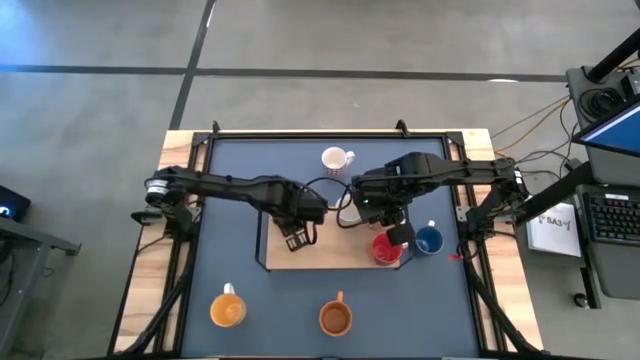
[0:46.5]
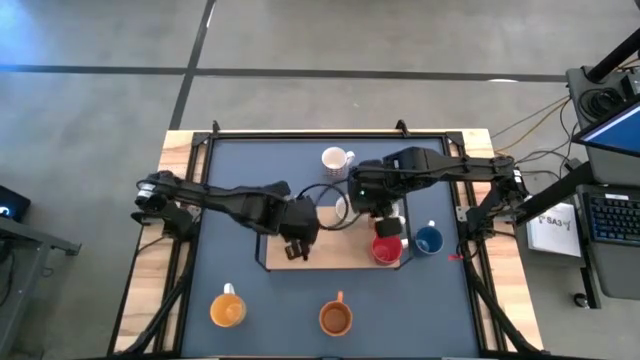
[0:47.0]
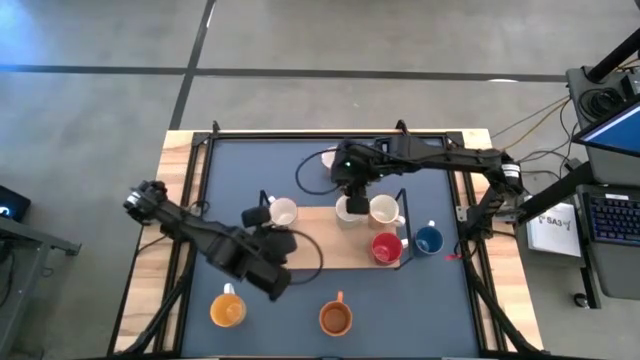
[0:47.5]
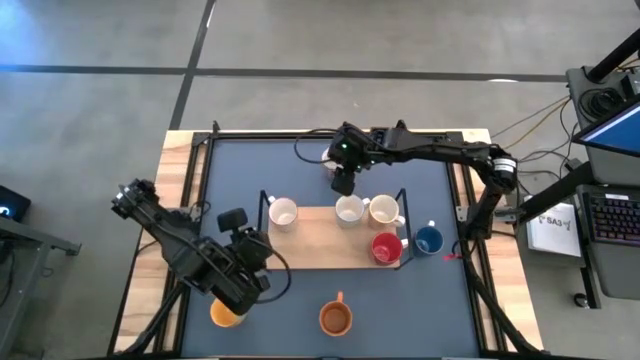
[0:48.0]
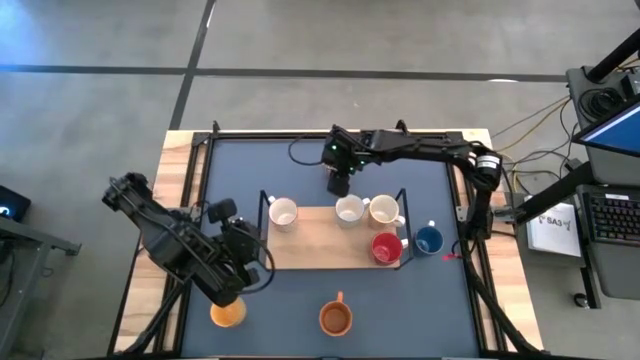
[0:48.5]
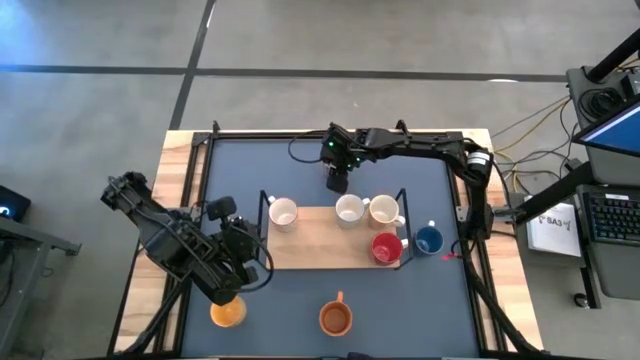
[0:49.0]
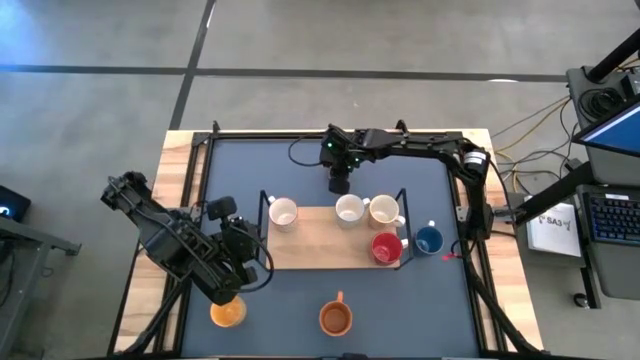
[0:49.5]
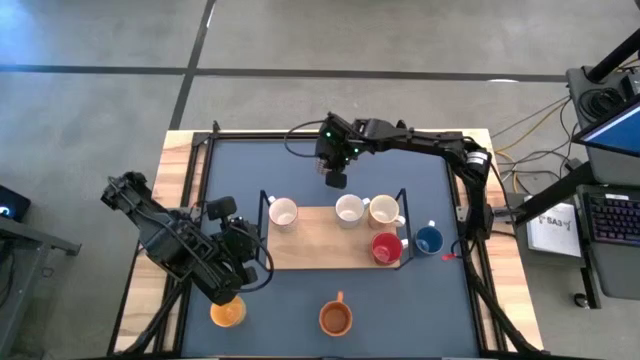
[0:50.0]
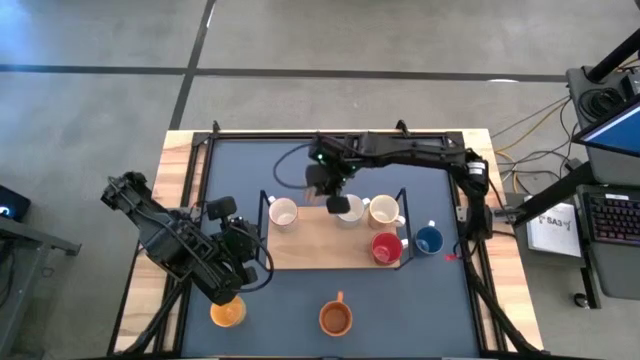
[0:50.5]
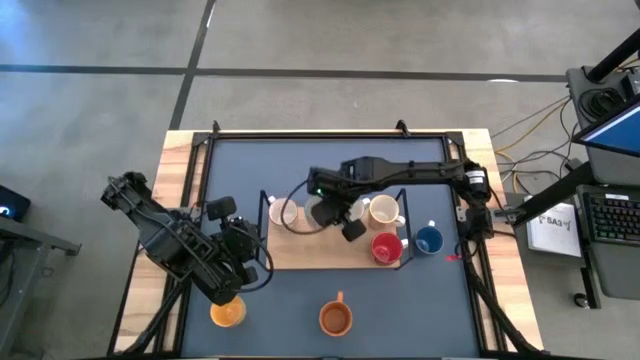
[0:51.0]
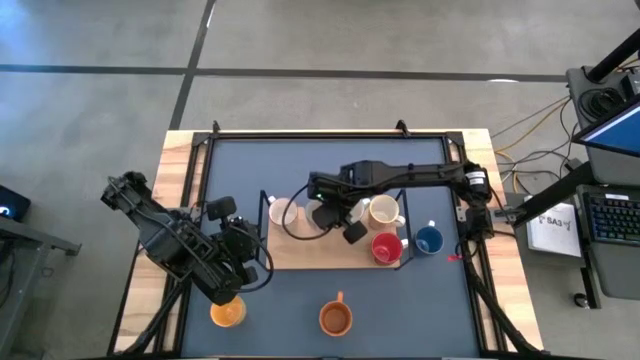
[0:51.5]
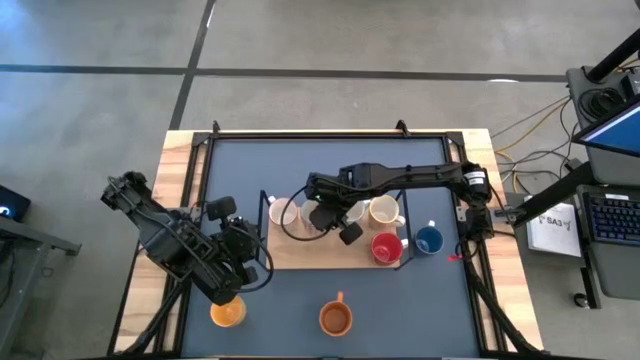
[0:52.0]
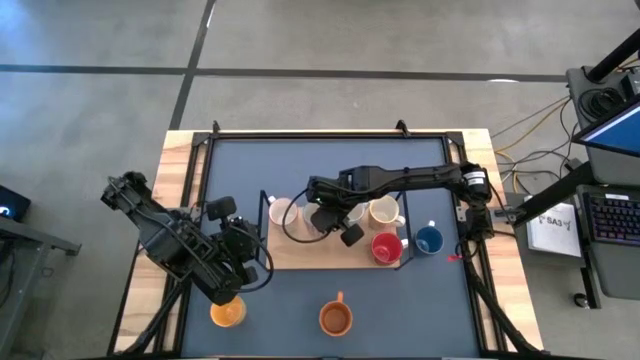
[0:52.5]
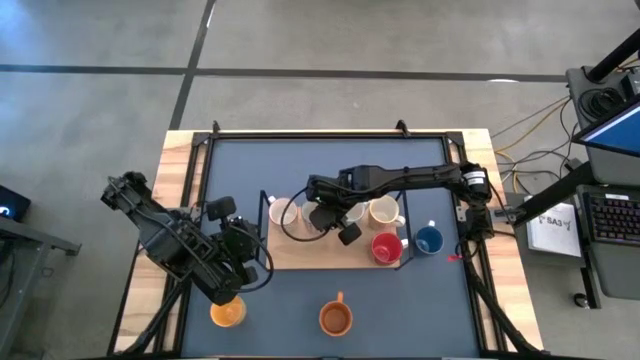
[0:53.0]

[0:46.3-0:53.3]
Task: Place coffee mugs
Put the red blue patterned mug on the shelf

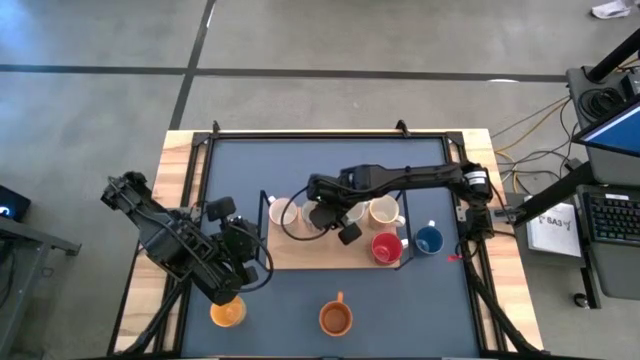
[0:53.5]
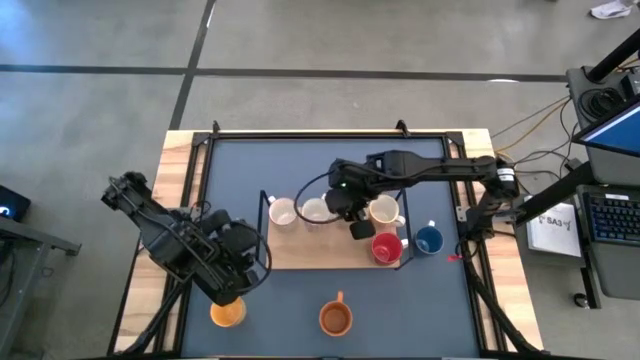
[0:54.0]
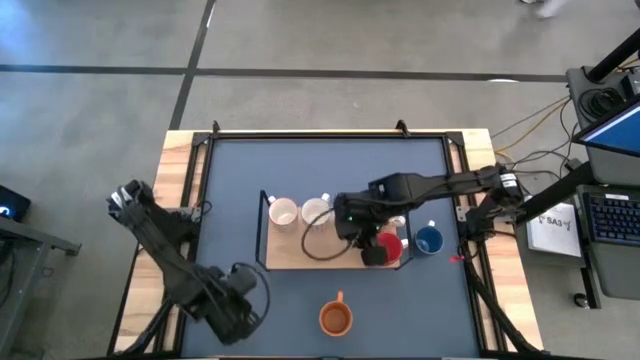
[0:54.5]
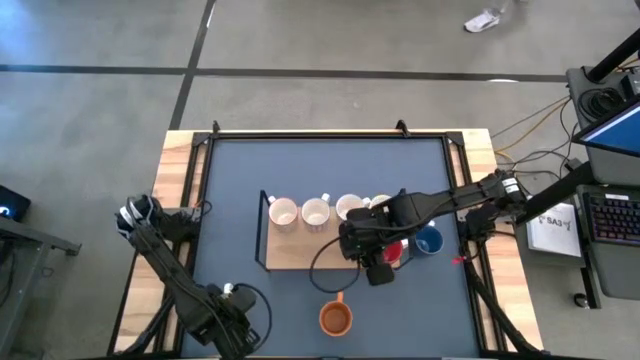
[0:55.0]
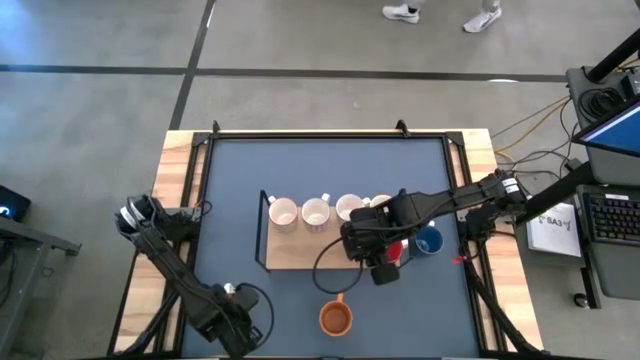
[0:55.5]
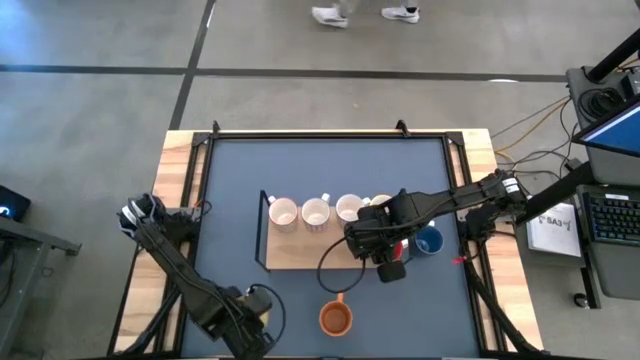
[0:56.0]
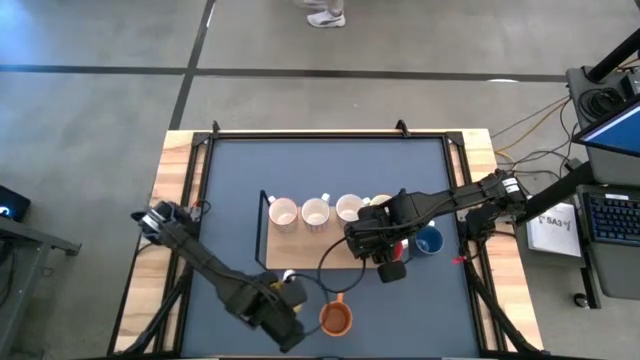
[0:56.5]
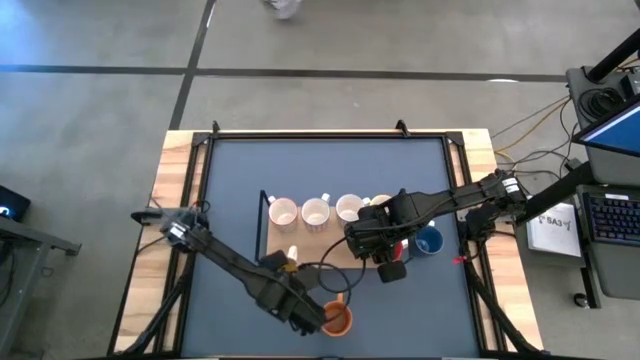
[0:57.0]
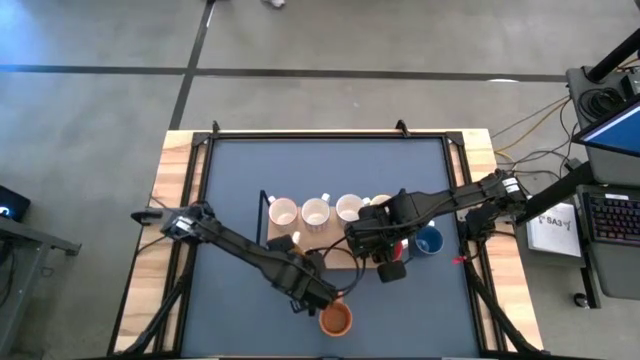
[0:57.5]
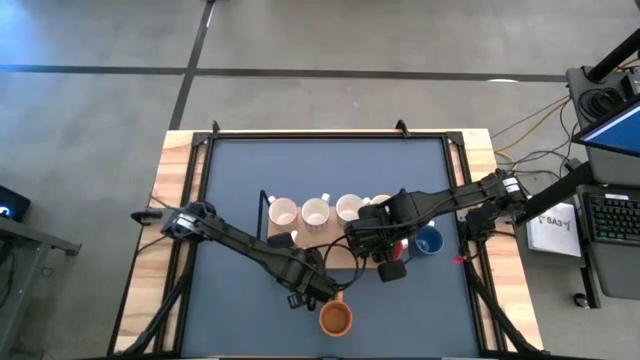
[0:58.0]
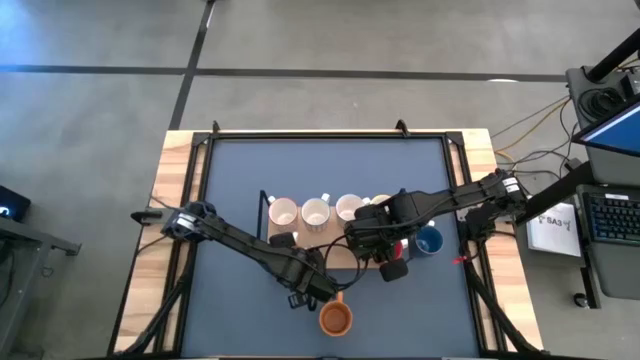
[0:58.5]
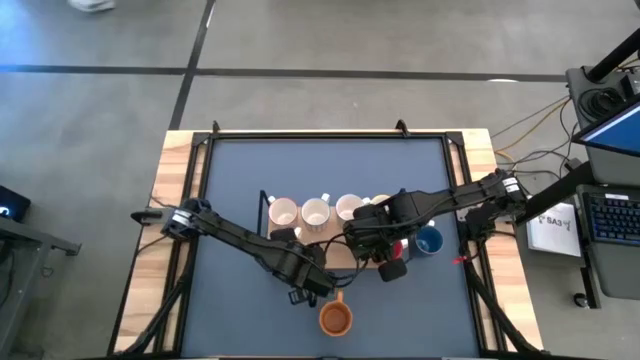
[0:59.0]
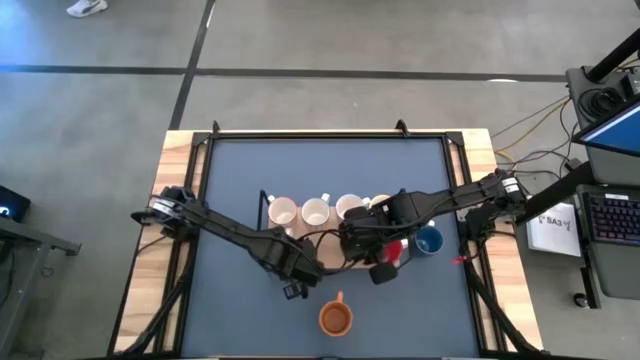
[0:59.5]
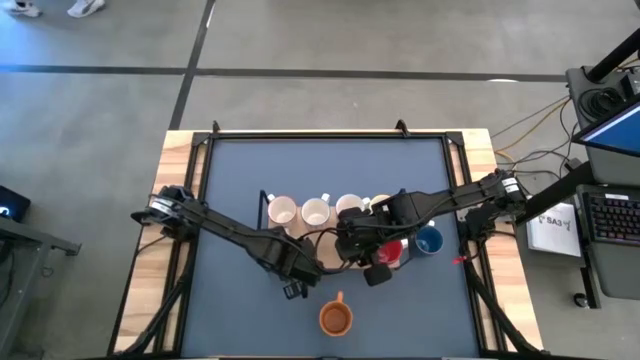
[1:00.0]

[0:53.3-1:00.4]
Put the yellow mug on the shelf

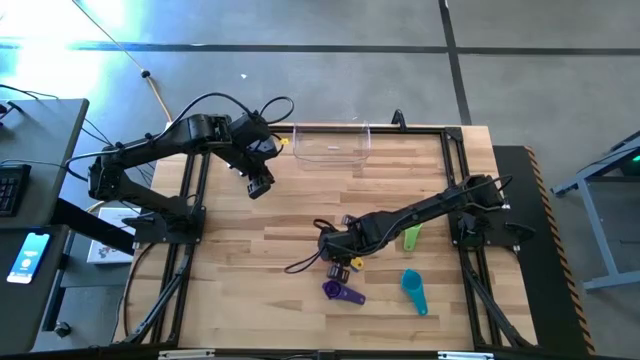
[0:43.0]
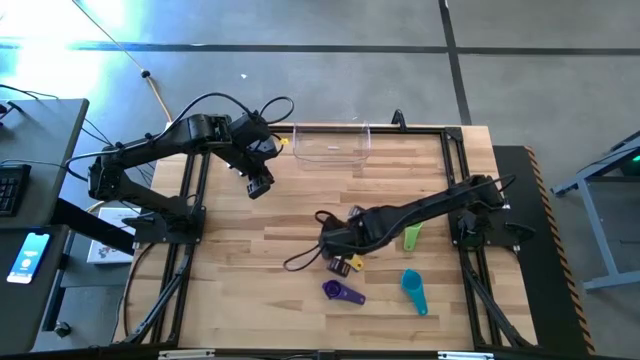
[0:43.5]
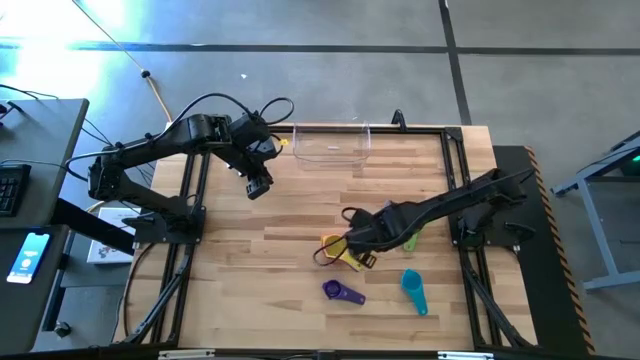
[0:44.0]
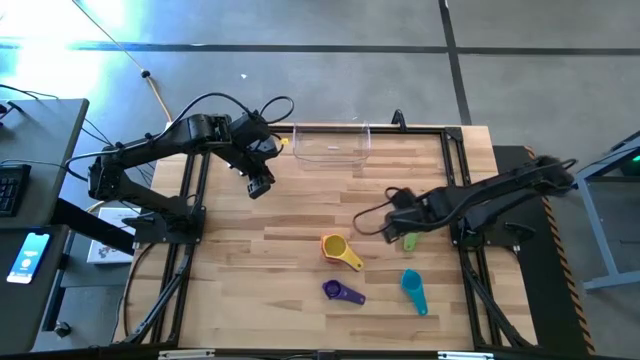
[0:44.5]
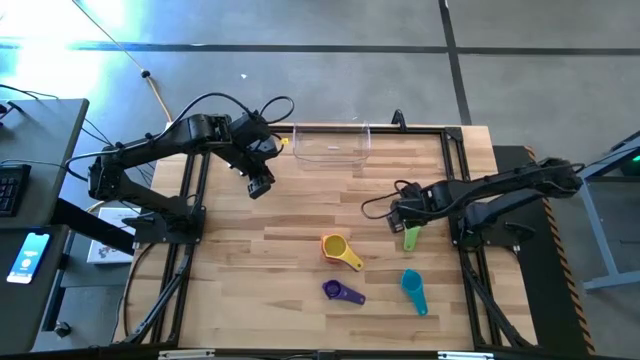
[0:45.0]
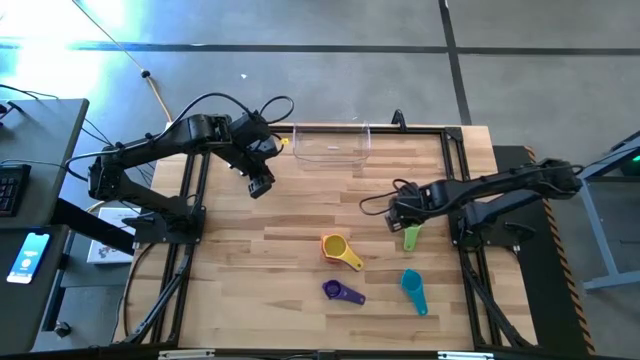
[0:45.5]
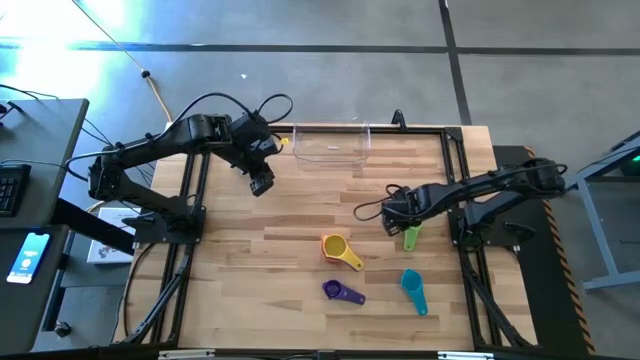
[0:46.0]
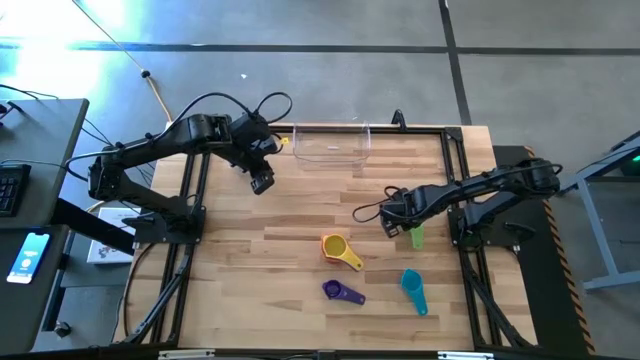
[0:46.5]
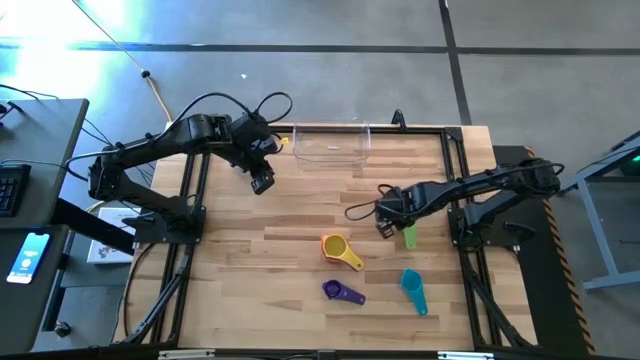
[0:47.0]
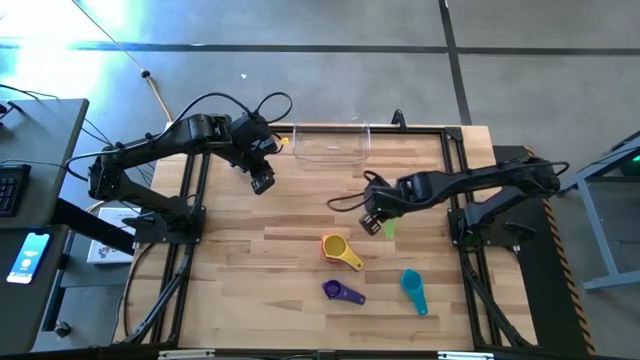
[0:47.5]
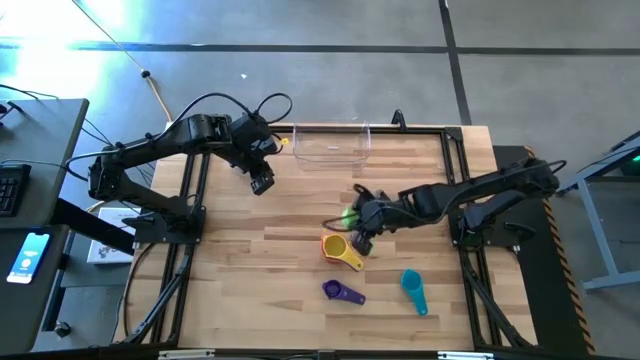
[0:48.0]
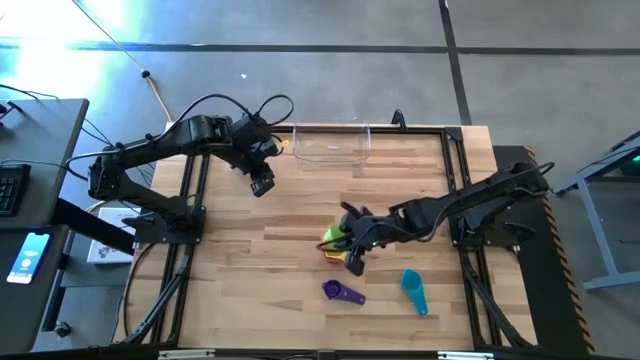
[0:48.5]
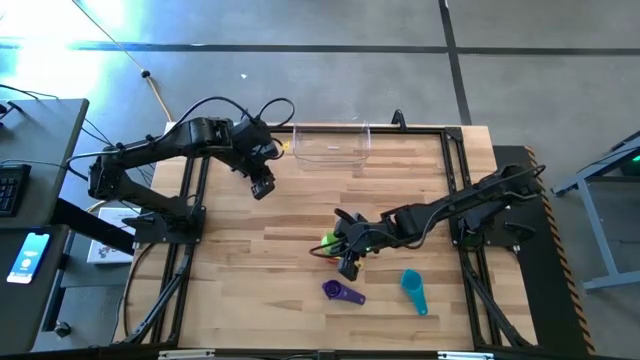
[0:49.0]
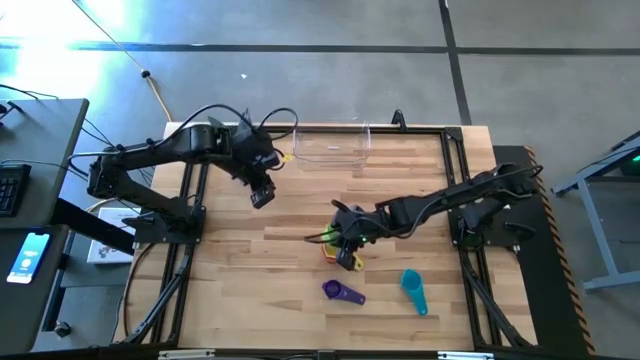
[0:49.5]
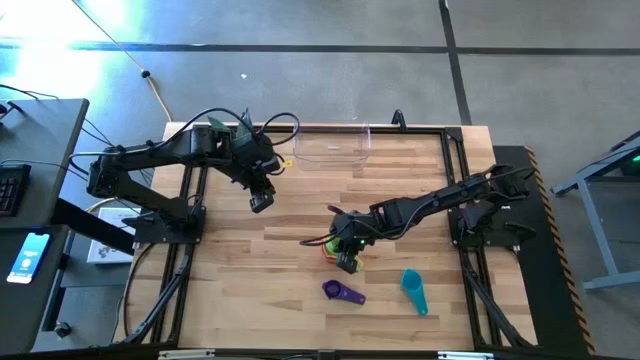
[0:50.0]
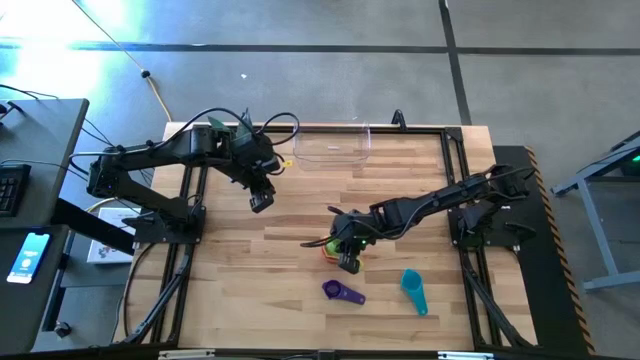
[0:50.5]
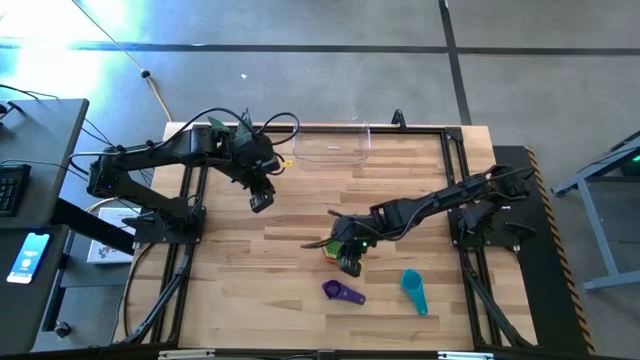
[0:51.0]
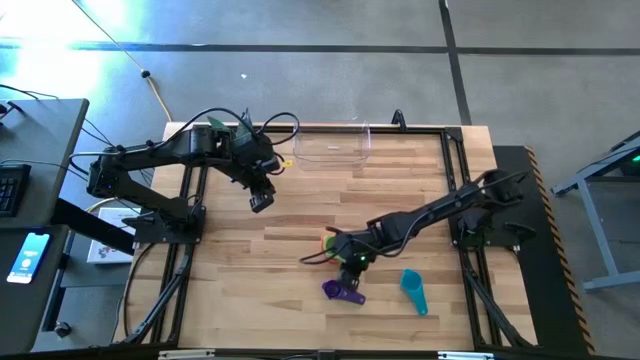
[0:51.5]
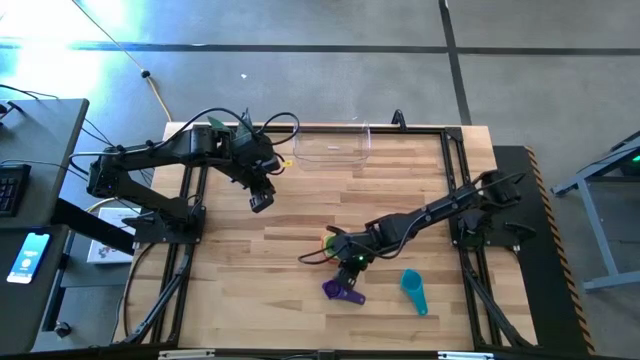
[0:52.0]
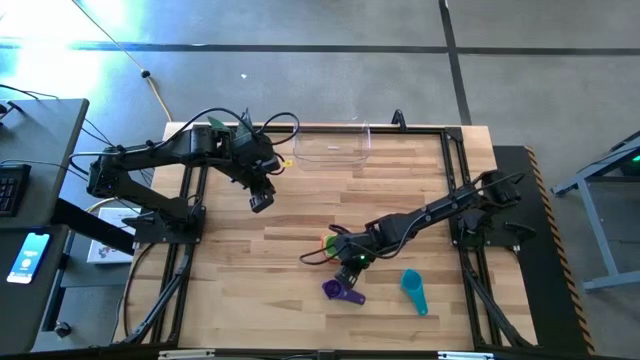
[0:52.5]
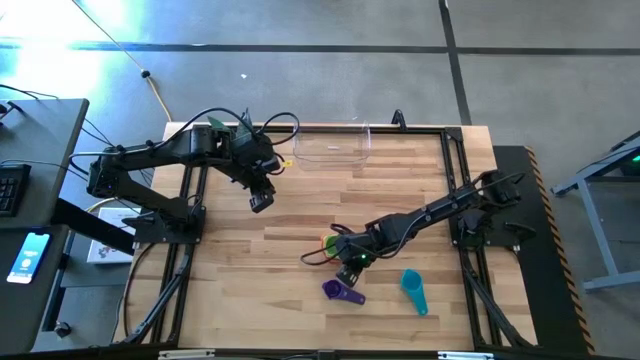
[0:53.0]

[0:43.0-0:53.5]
Task: Nest measuring cups in basket
Stack the green measuring cup on top of the yellow measuring cup
